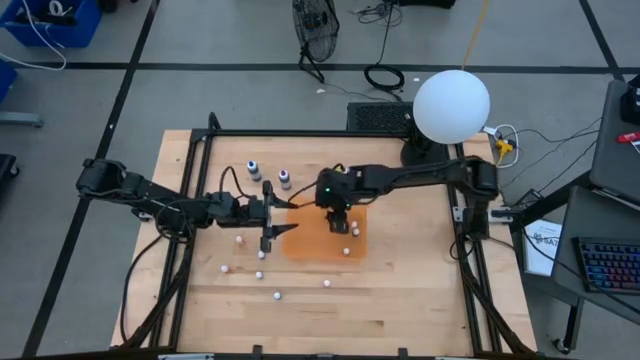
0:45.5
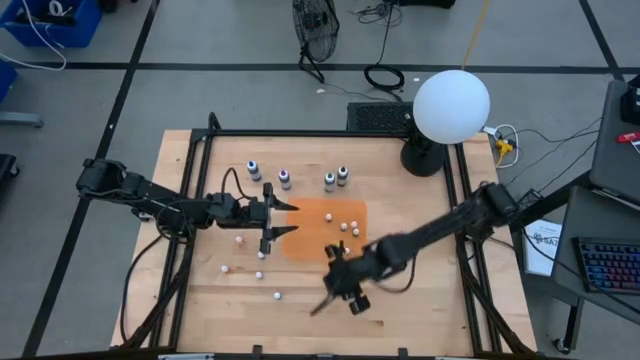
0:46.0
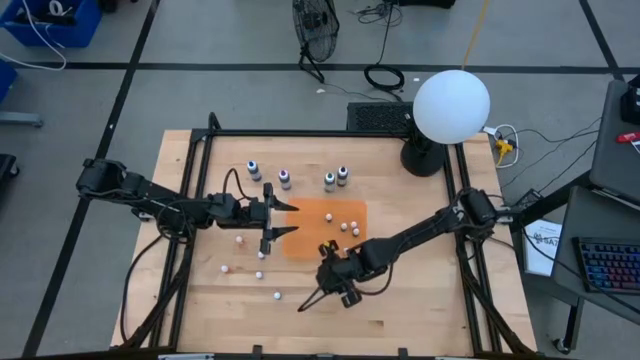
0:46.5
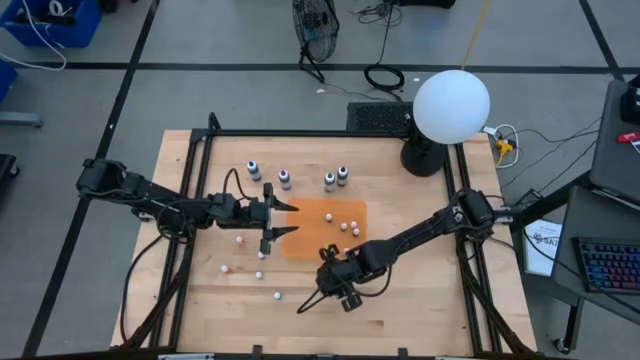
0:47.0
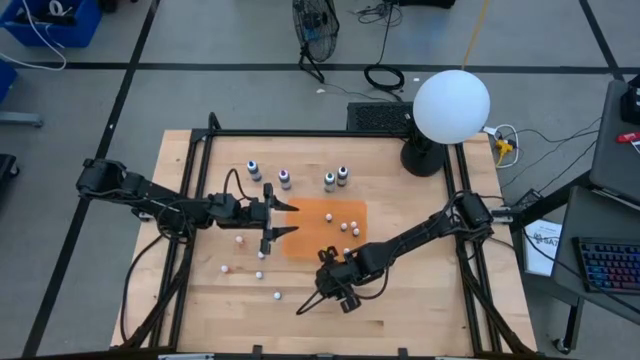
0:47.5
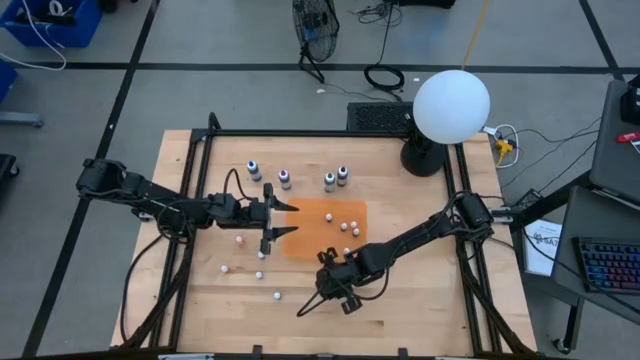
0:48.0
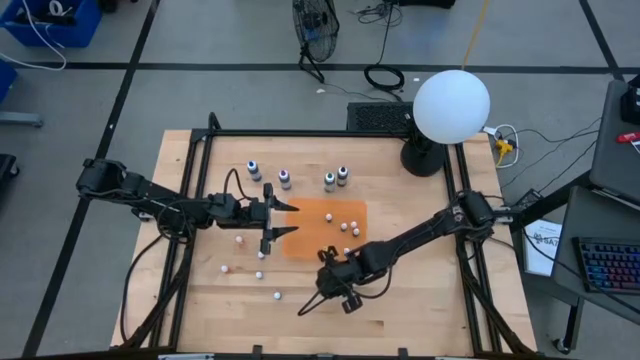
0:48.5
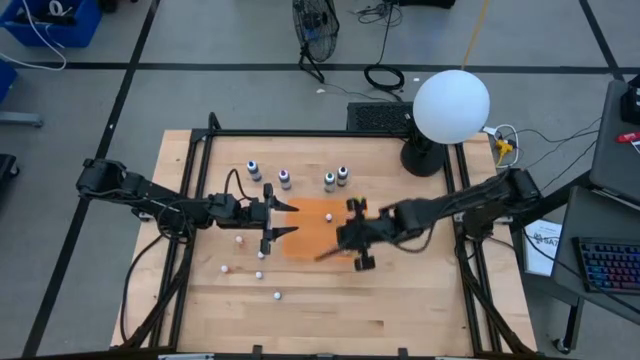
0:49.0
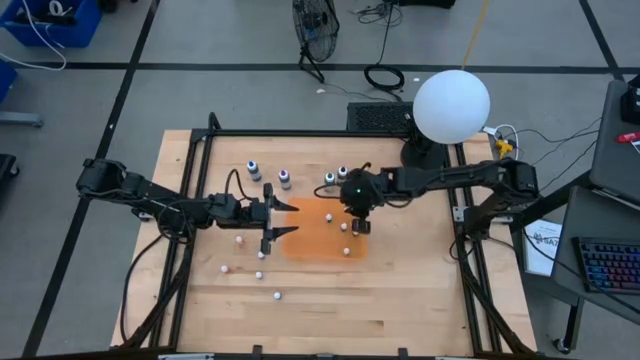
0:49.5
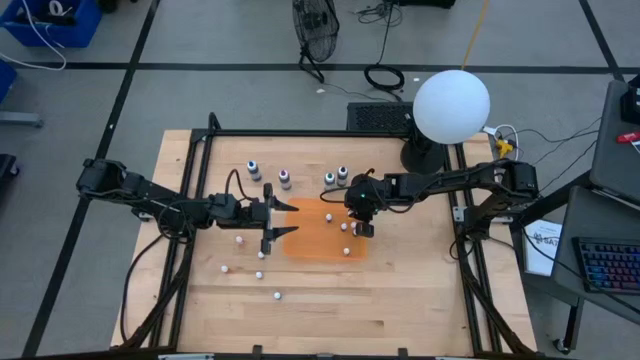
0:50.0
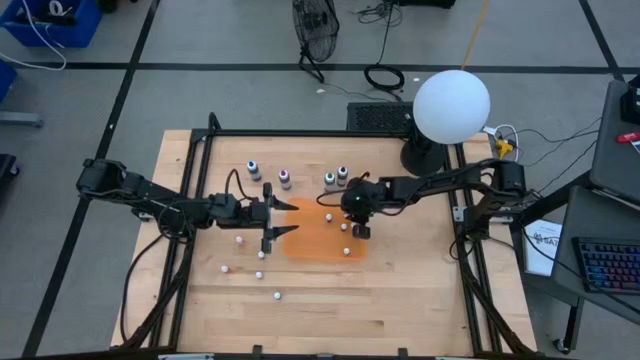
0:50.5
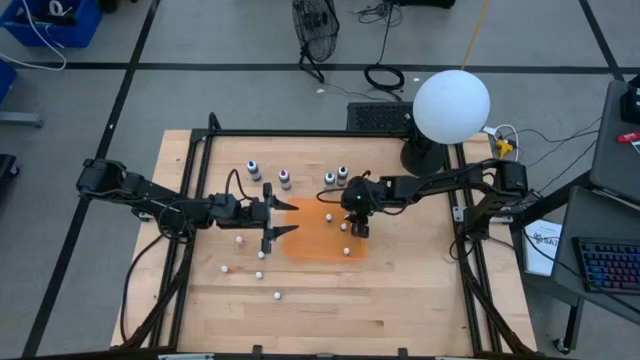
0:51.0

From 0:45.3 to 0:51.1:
Task: Pick & Place food coloring
Put the small orange food coloring bottle into the orange bin

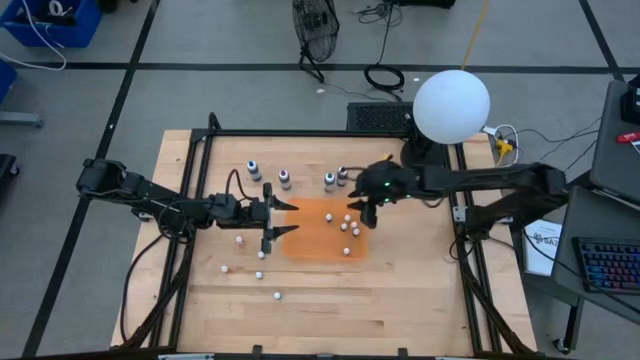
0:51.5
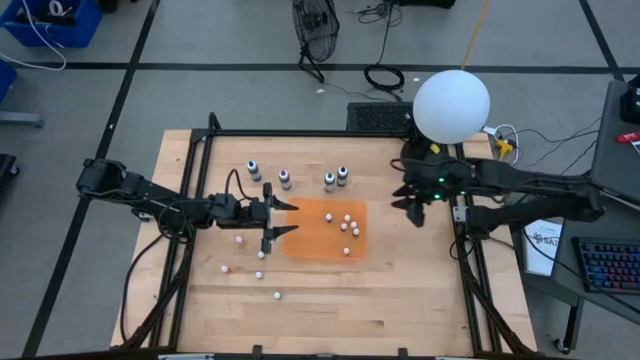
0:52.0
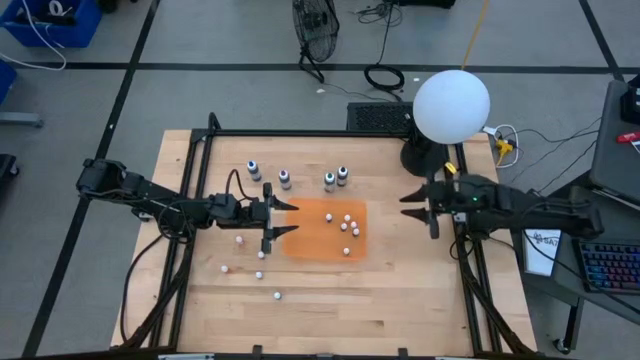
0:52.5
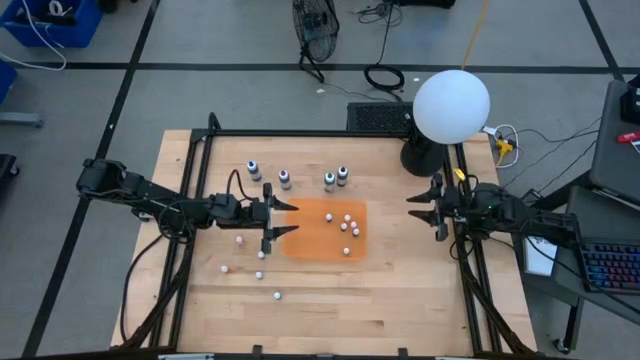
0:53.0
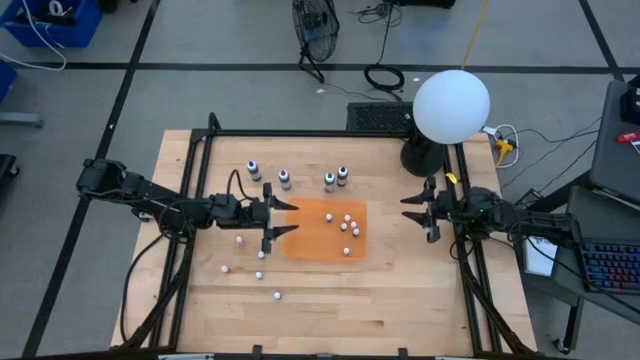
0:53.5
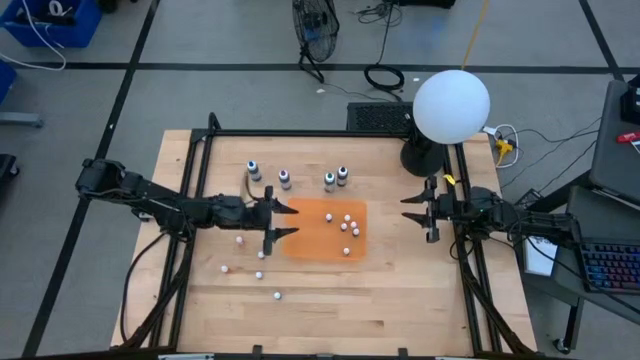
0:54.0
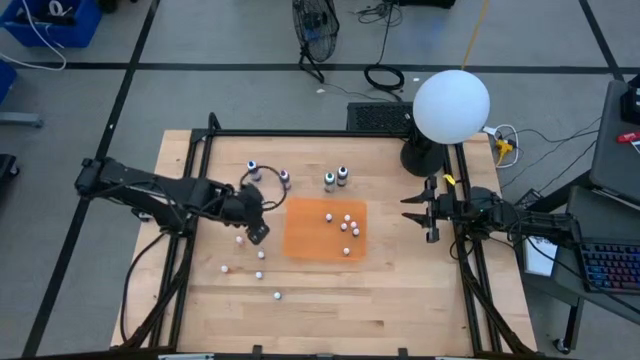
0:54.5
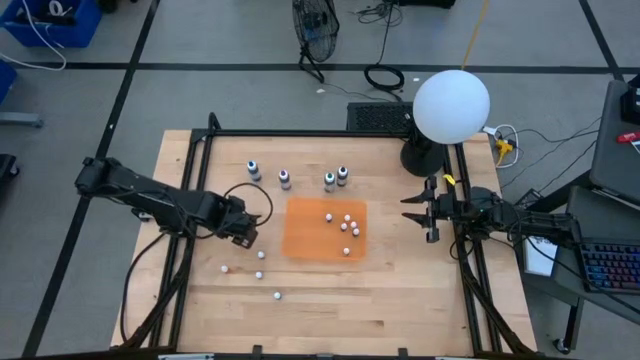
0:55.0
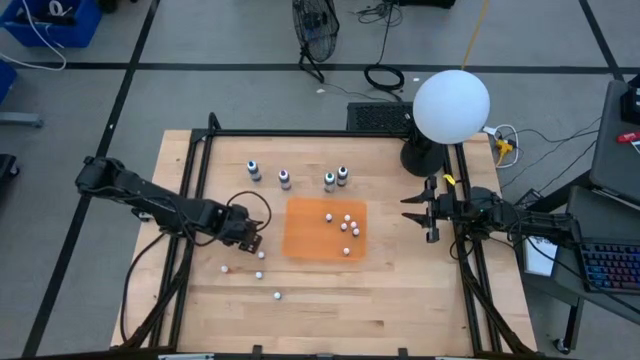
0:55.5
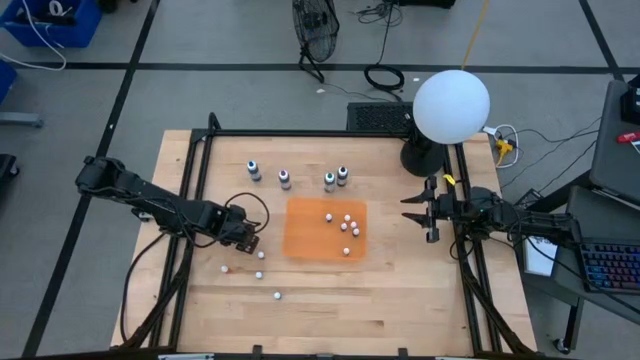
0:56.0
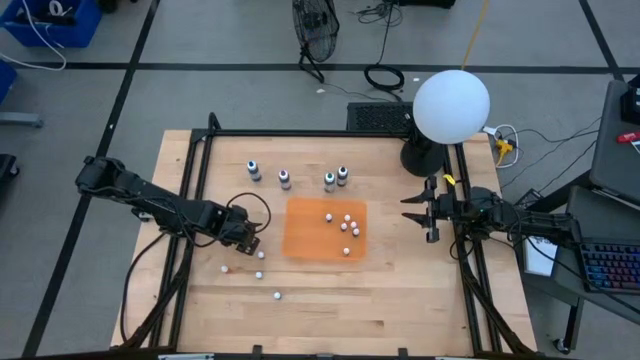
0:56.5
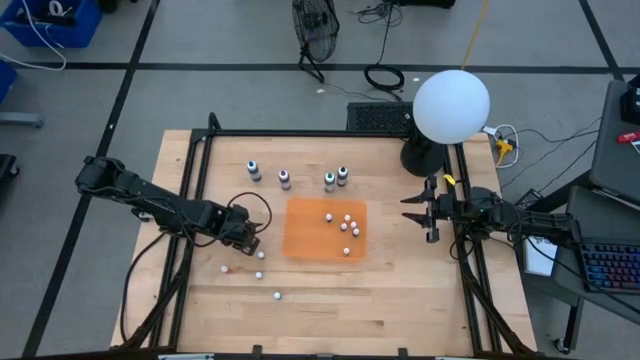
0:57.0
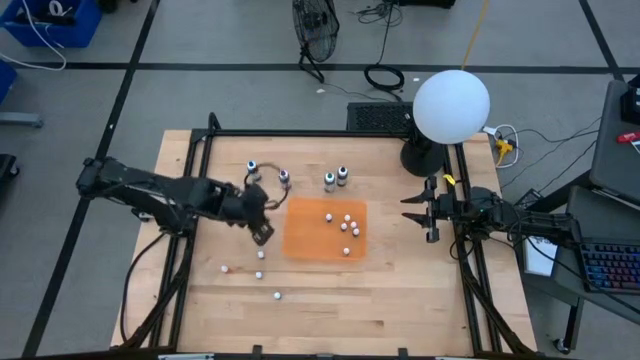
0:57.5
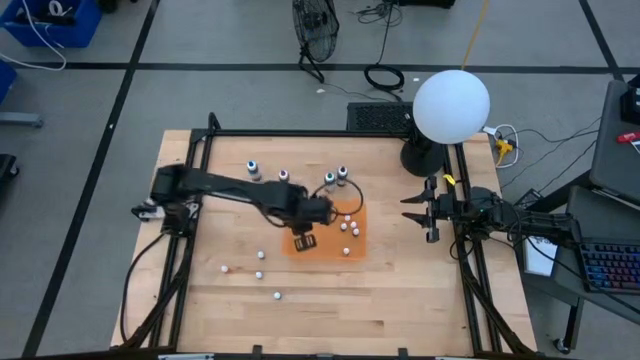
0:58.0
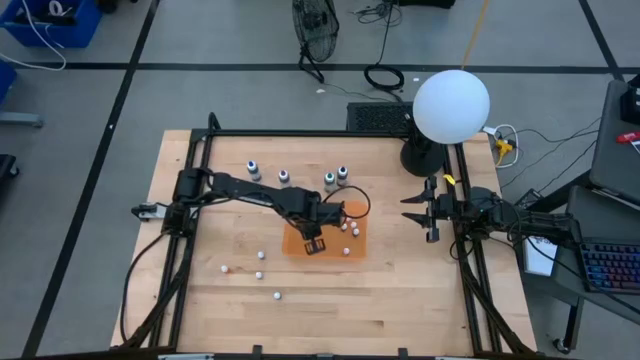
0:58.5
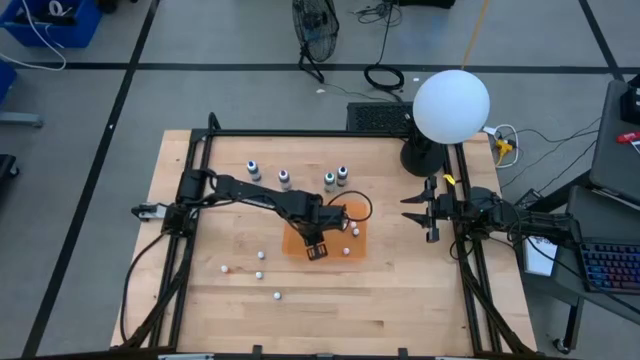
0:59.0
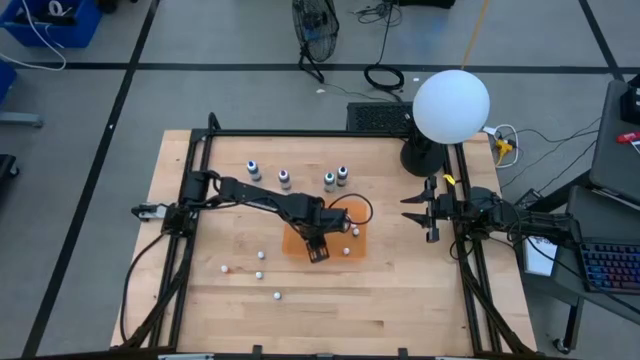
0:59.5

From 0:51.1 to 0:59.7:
Put the small orange food coloring bottle into the orange bin

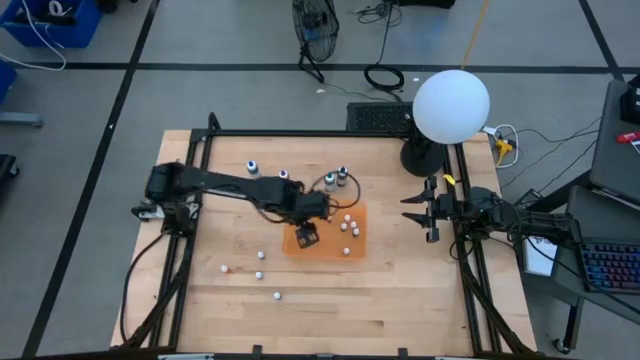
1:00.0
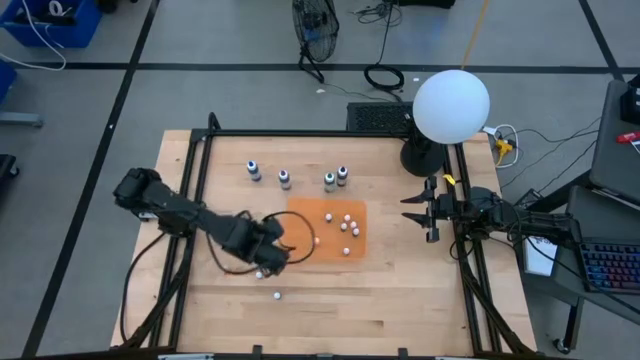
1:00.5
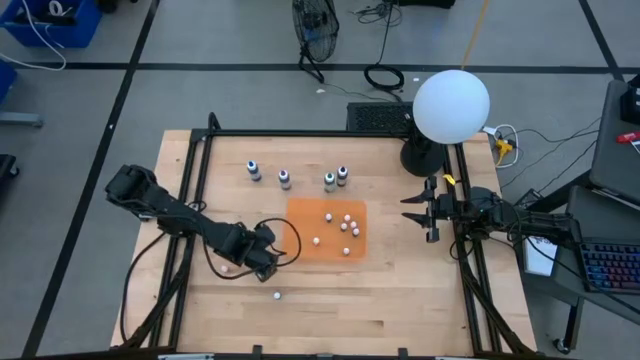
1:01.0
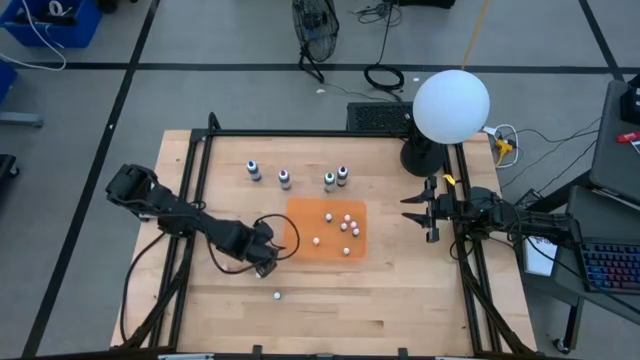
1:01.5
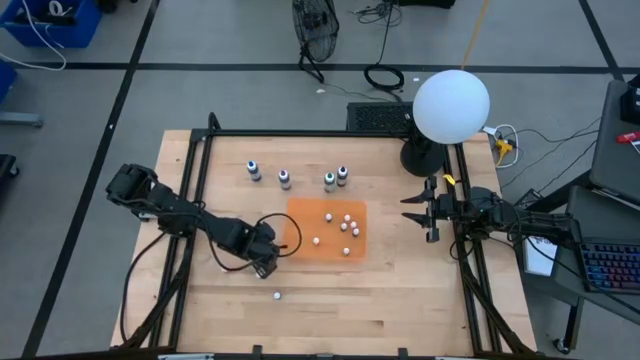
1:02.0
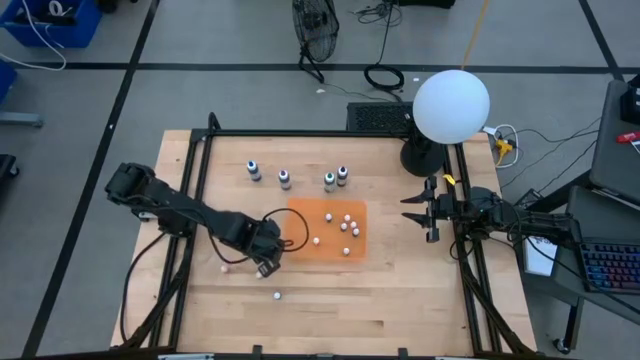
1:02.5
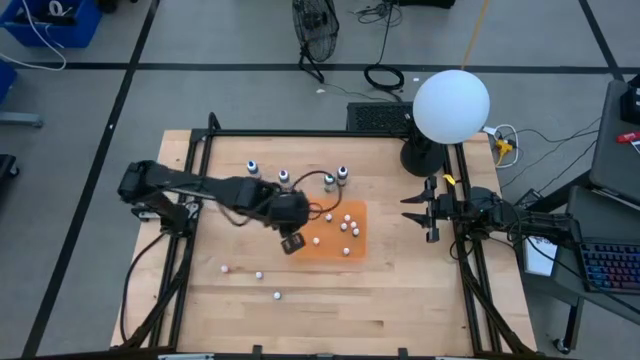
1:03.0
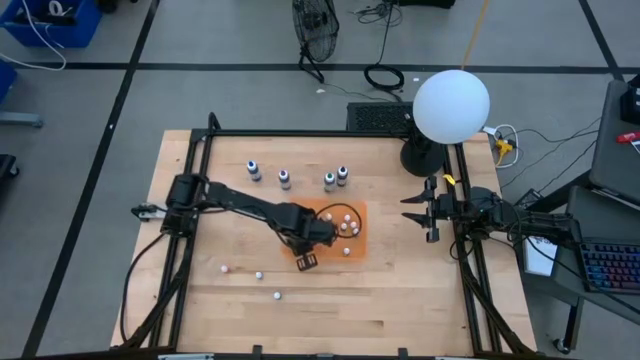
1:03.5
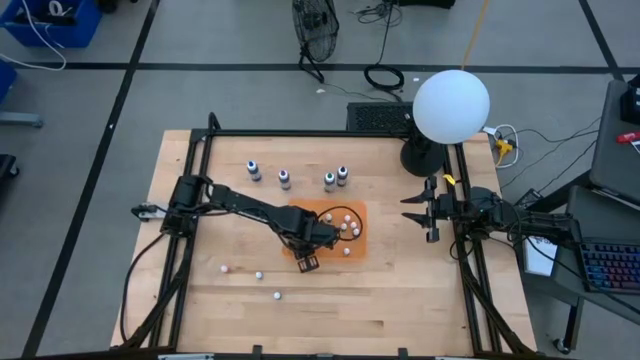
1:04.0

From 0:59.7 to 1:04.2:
Put the small purple food coloring bottle into the orange bin

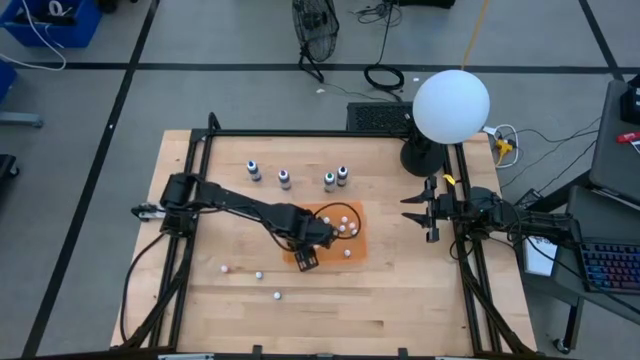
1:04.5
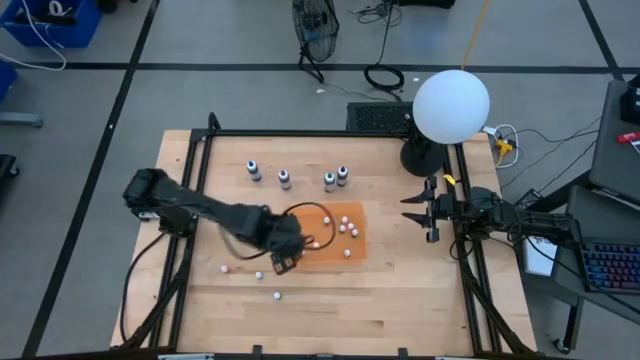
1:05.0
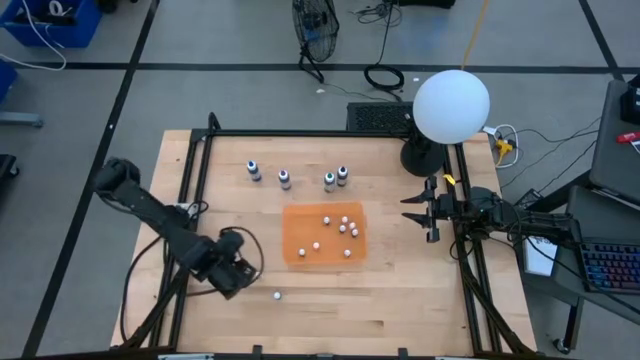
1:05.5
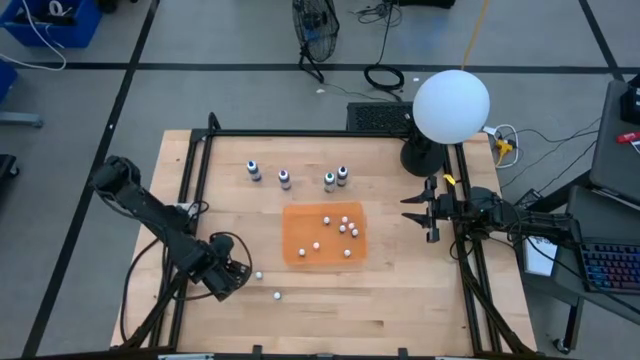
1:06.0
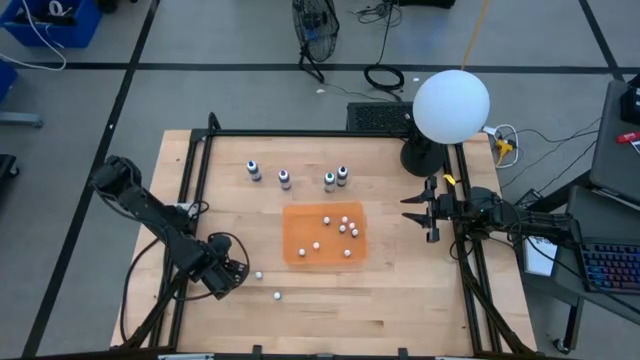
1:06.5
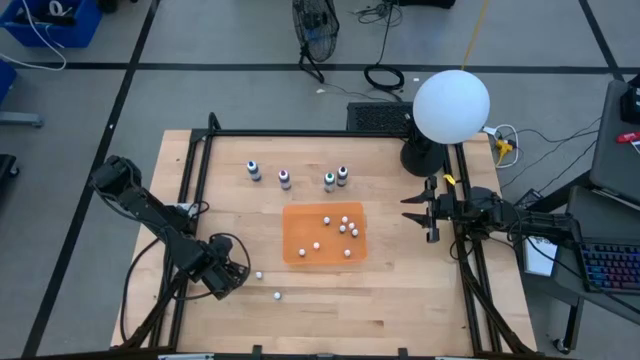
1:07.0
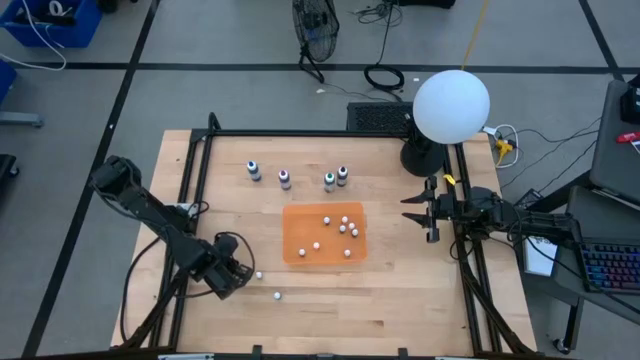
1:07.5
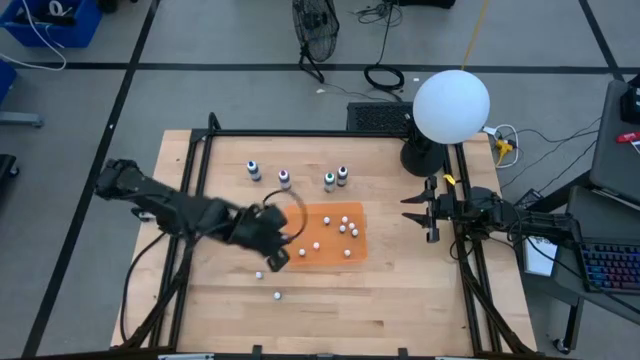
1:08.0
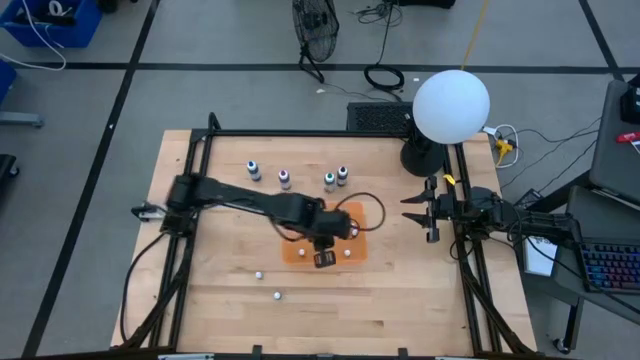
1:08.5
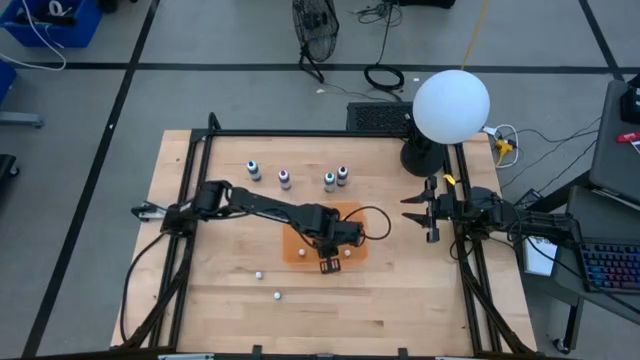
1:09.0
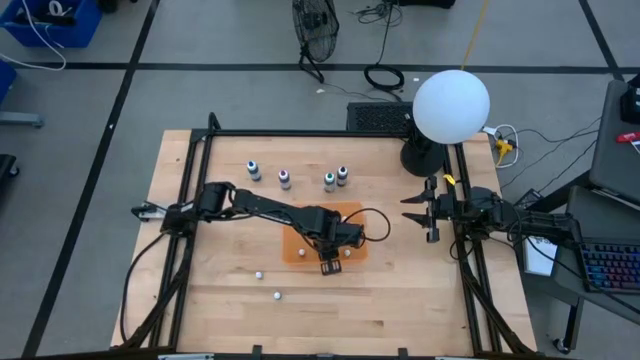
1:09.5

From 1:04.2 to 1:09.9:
Put the small orange food coloring bottle into the orange bin
